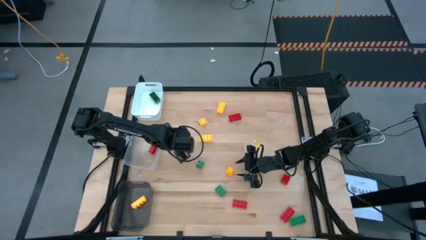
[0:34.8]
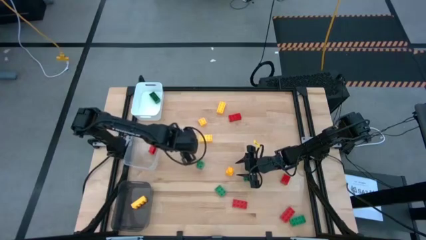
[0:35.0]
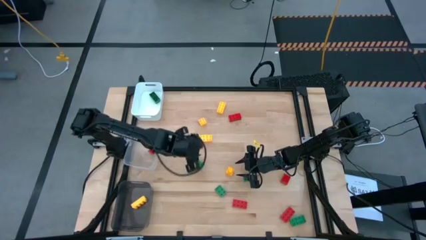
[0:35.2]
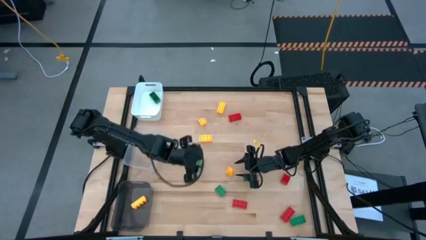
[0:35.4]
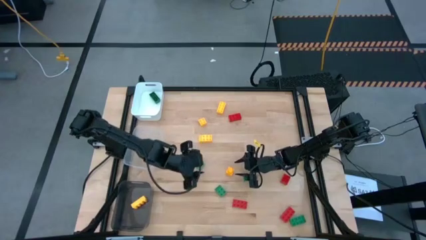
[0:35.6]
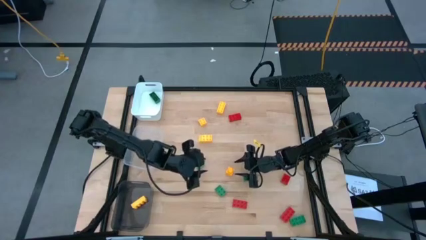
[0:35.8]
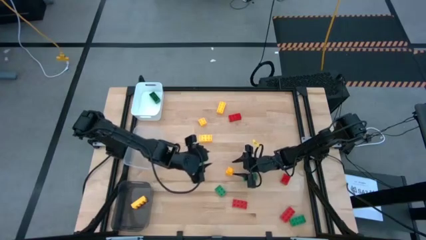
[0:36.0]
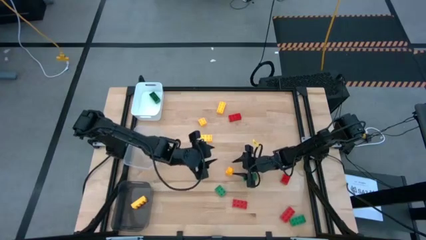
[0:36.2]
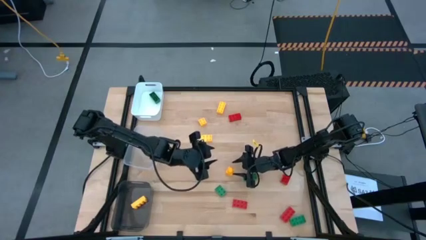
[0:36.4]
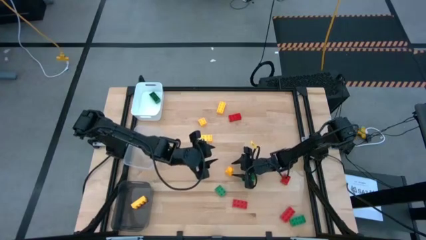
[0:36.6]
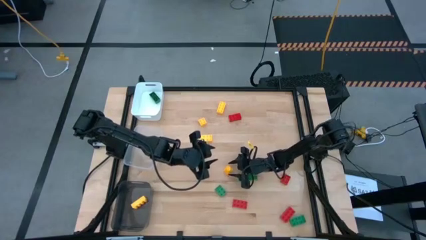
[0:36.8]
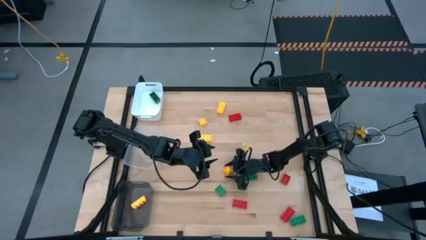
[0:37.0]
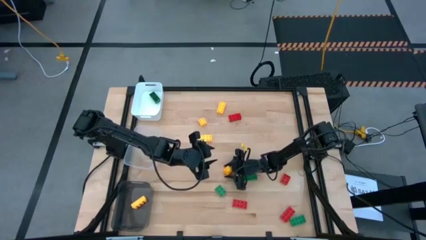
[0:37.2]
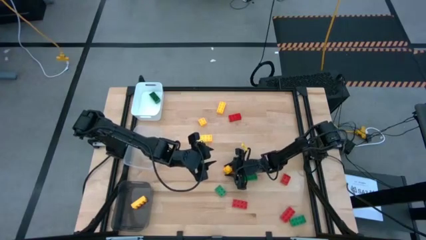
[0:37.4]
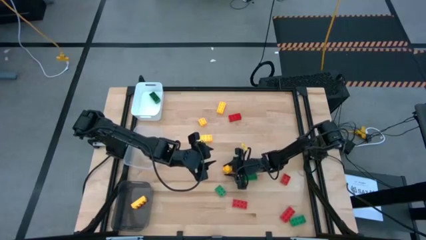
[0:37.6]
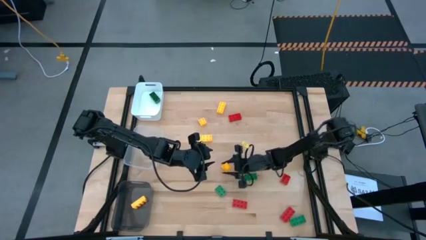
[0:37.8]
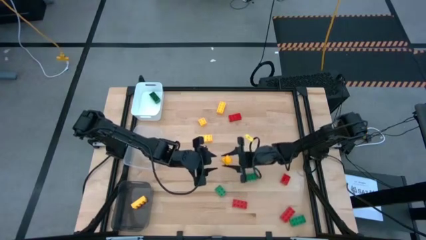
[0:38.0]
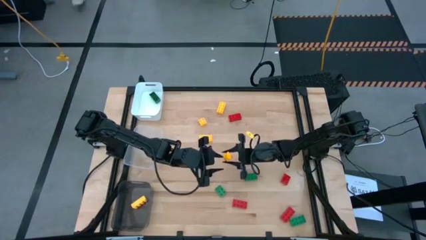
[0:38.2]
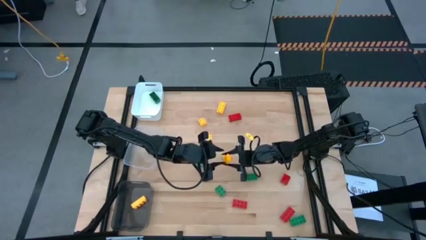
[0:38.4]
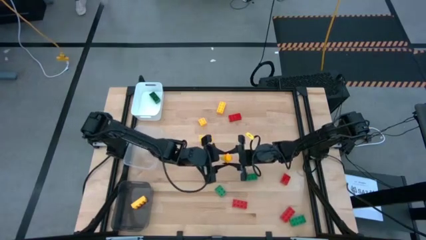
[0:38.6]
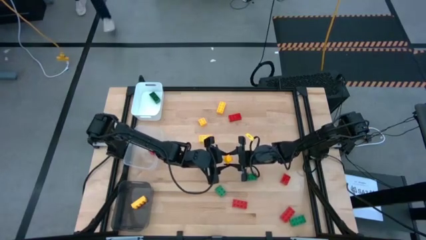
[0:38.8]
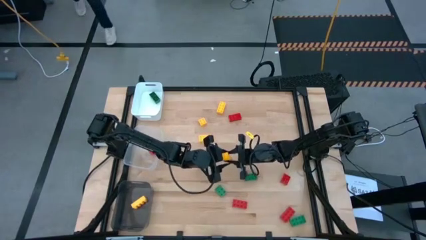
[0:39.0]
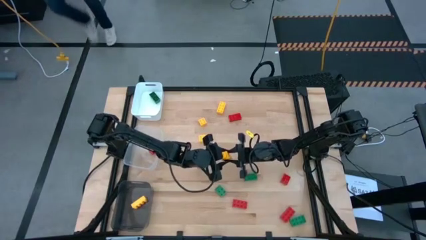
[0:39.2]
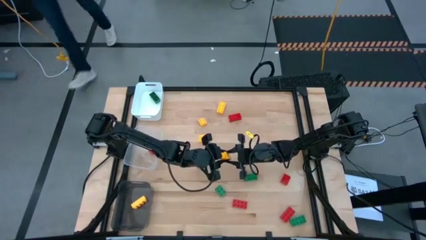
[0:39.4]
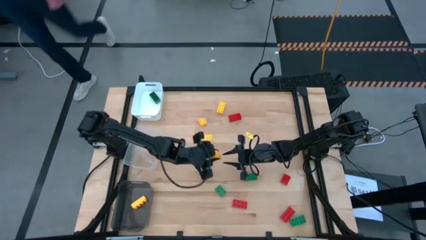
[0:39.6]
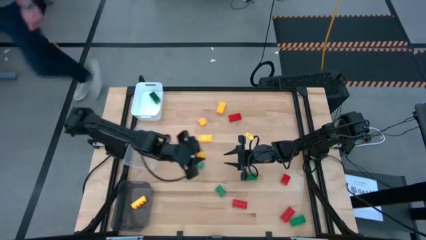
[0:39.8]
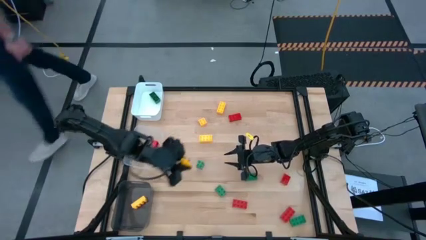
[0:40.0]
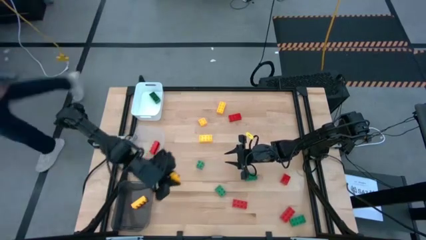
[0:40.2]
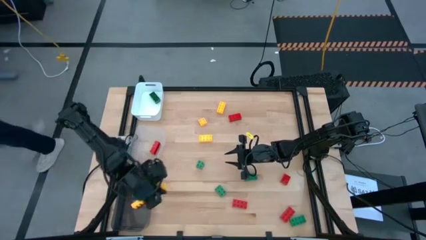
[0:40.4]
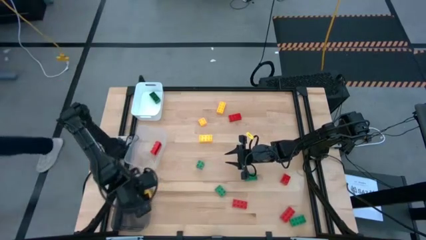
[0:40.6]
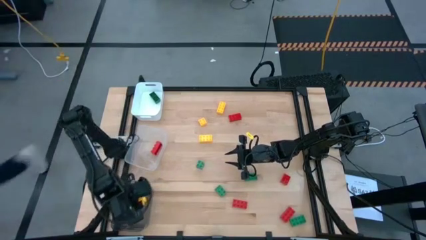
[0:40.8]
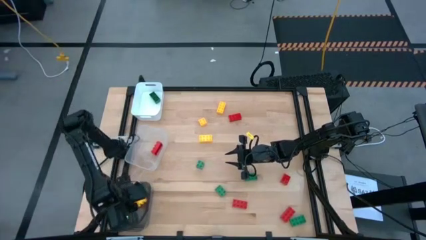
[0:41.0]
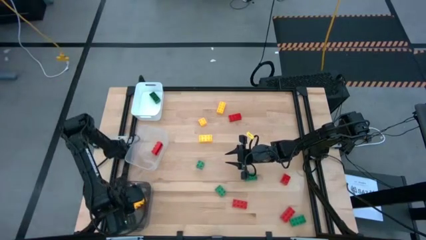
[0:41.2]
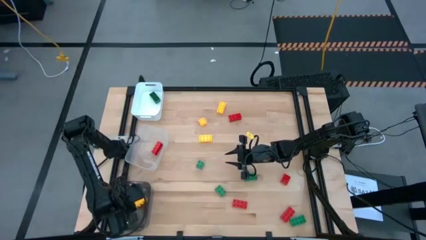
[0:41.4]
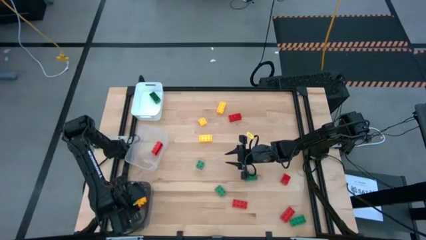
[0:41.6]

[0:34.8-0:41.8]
Task: Sort & place blocks by color
Put the yellow game piece into the black bin

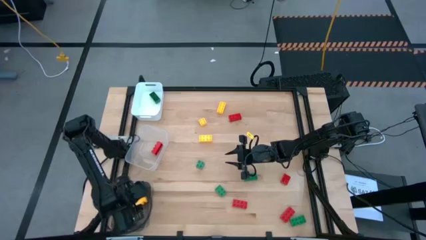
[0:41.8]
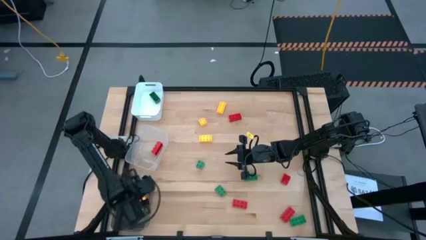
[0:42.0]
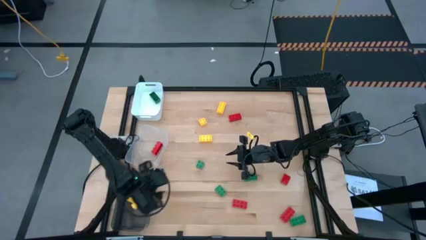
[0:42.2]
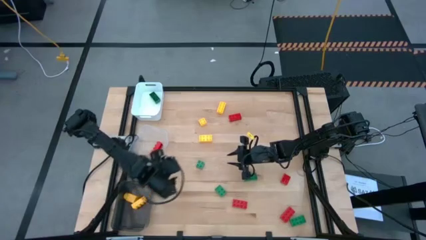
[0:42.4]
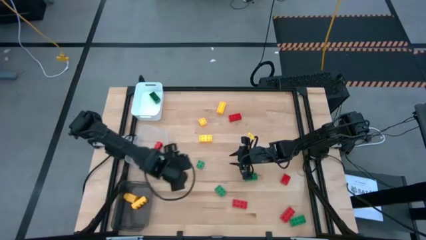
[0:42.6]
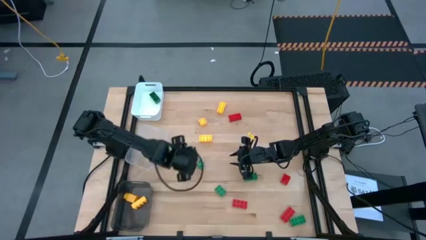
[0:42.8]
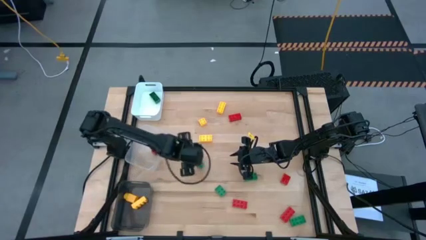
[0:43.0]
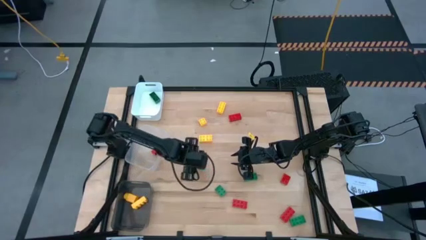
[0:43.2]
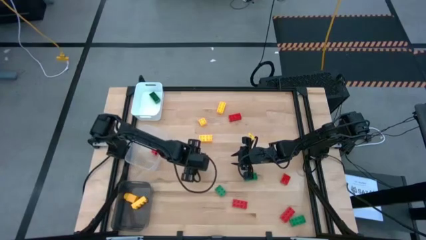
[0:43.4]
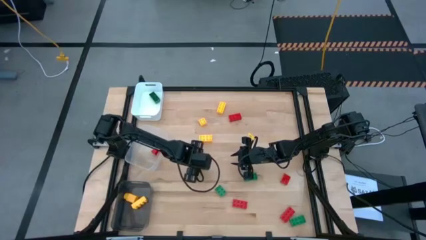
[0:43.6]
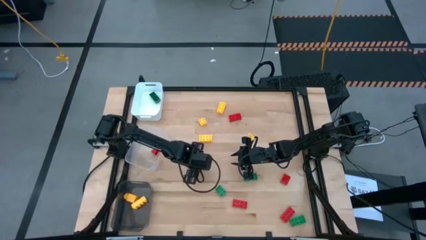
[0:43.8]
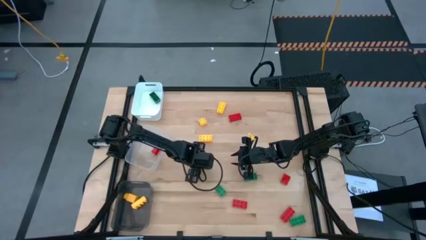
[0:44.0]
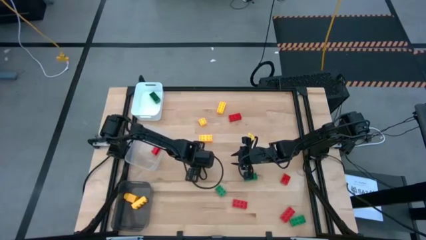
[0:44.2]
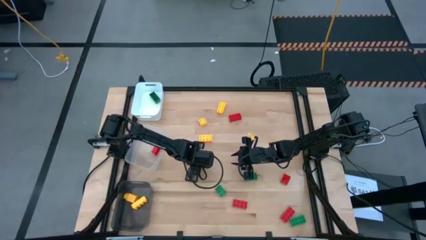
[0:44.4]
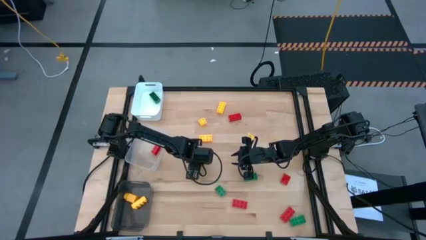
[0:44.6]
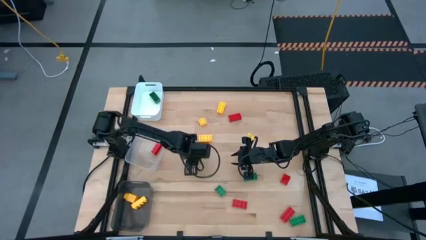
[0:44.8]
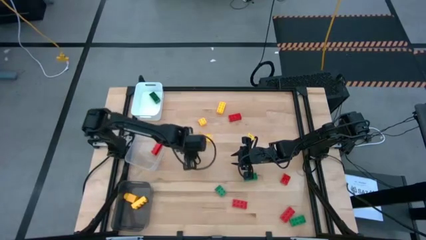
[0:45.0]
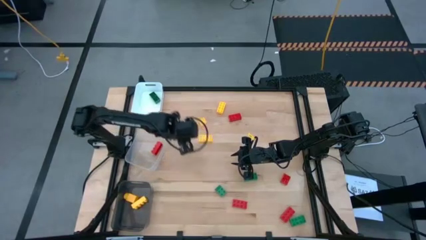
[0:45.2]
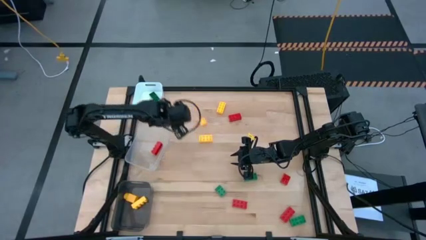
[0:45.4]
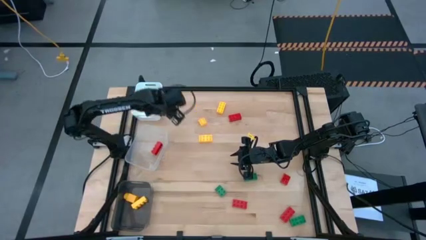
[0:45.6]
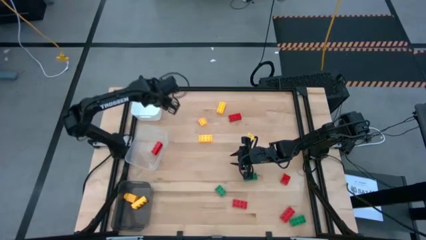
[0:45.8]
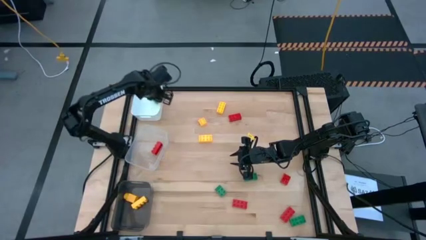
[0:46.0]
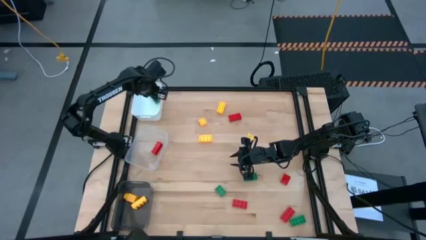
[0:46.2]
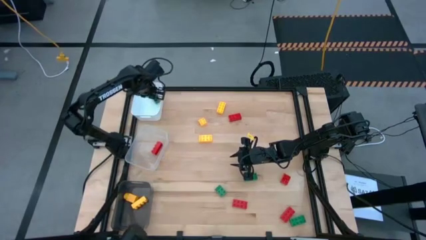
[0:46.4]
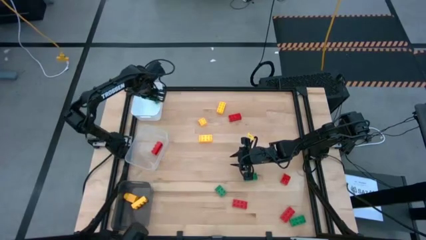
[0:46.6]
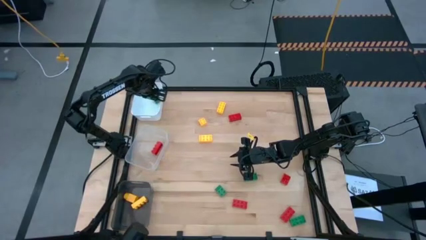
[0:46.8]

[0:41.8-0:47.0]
Put the green game piece into the white bin

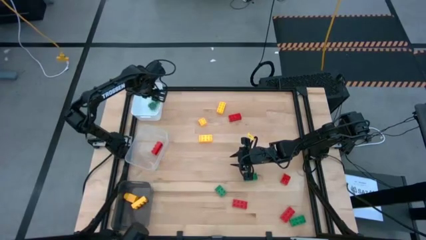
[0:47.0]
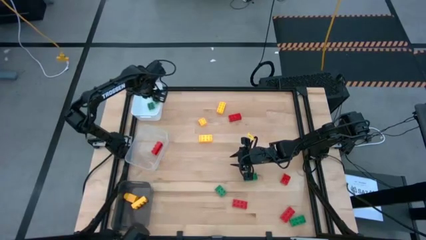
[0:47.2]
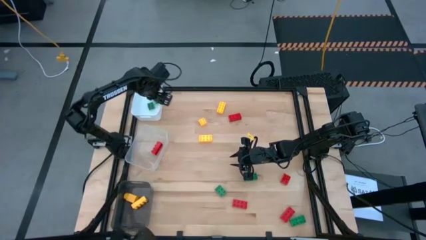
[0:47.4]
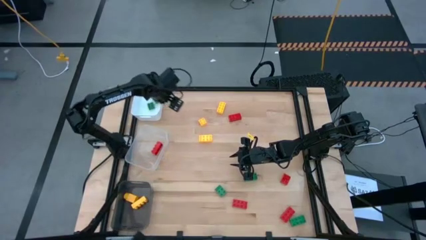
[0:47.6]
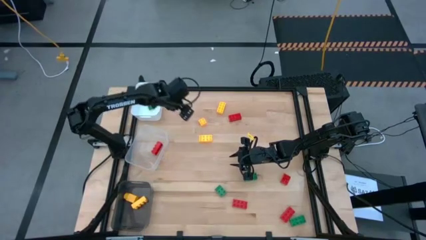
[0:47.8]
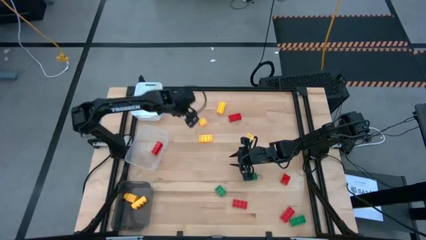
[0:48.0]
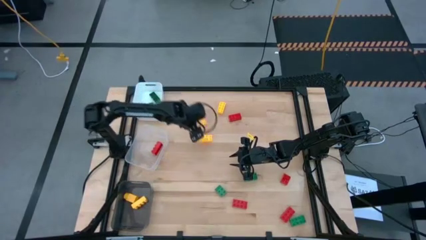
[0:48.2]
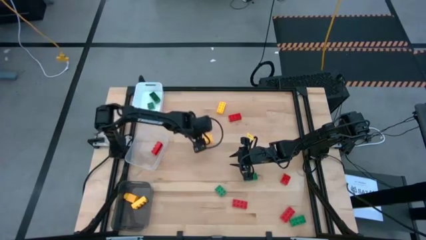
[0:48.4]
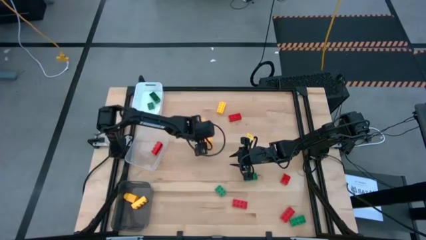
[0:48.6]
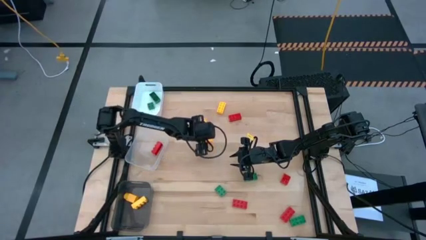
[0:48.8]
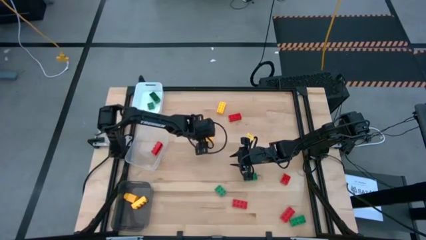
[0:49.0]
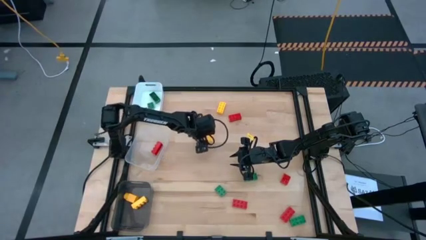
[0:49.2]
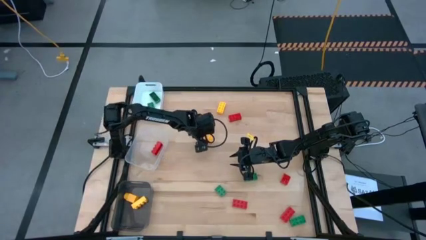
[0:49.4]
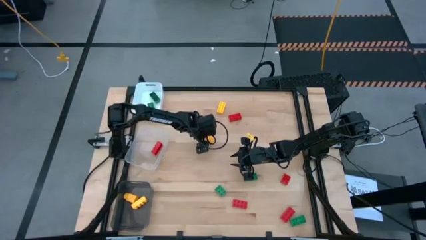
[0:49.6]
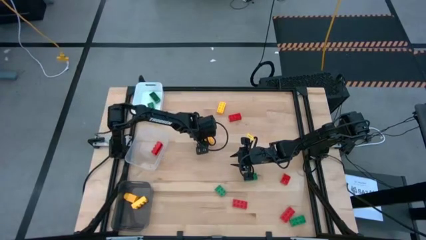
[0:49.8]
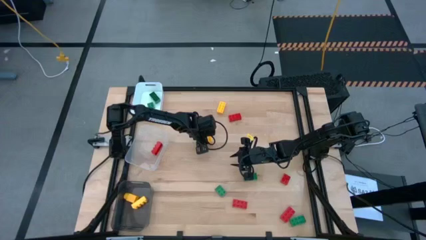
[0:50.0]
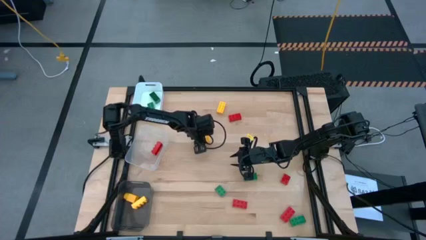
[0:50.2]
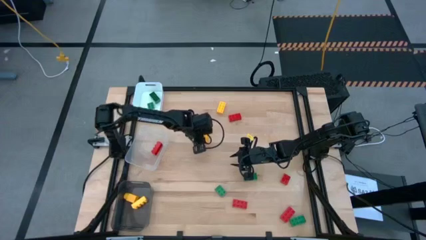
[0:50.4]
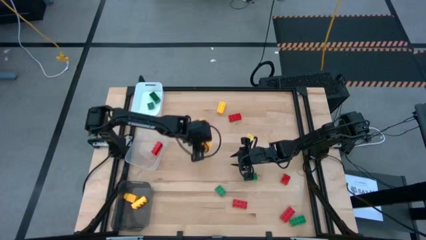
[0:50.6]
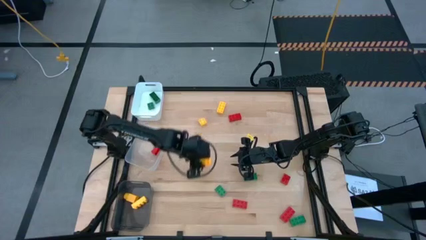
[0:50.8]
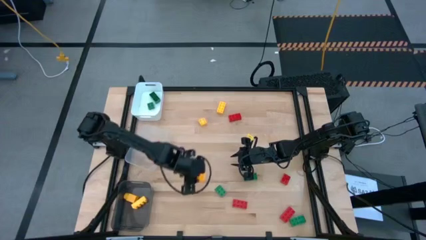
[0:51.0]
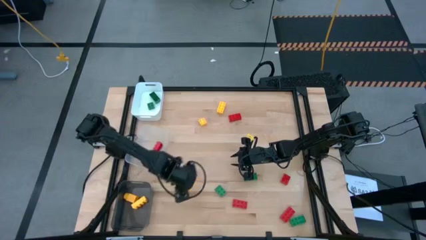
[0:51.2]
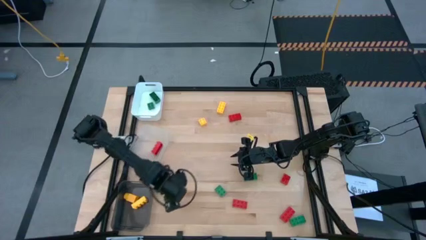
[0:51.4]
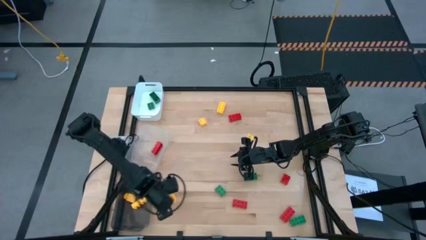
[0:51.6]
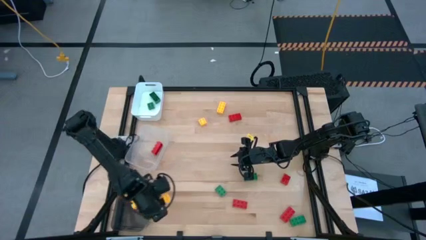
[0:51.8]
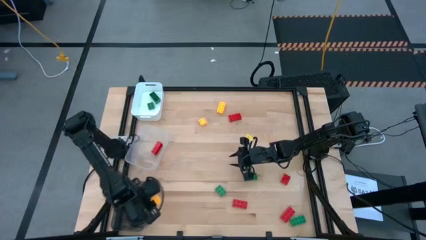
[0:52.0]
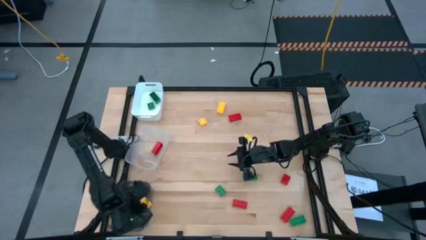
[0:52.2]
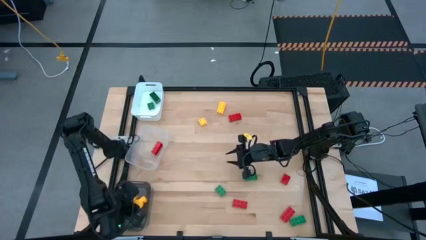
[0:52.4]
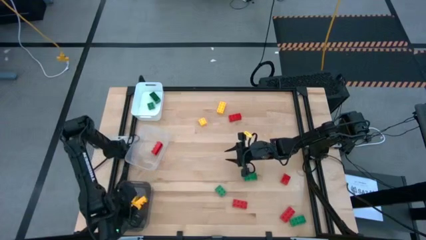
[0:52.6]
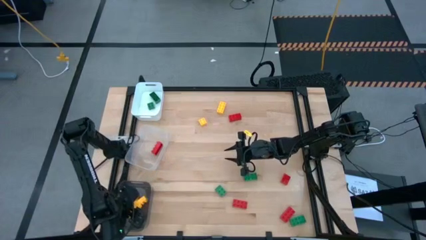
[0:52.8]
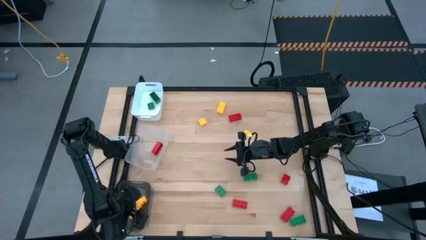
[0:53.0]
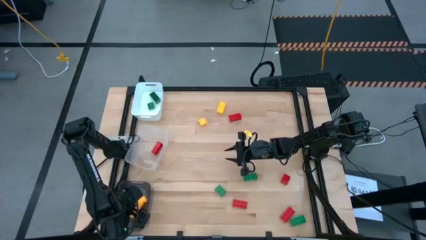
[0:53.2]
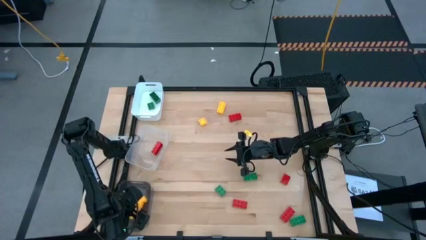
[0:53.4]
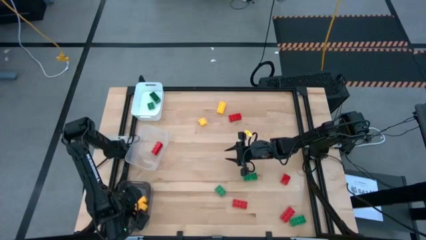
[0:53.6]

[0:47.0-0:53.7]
Put the bottom yellow game piece into the black bin
